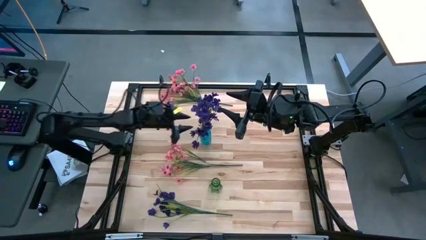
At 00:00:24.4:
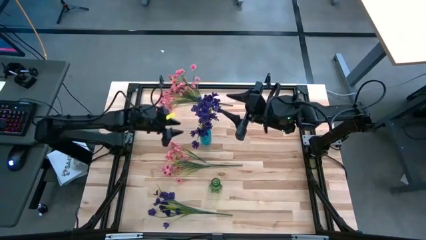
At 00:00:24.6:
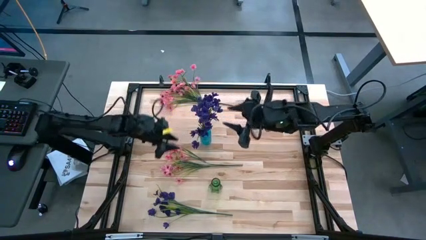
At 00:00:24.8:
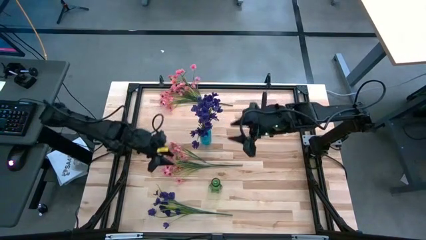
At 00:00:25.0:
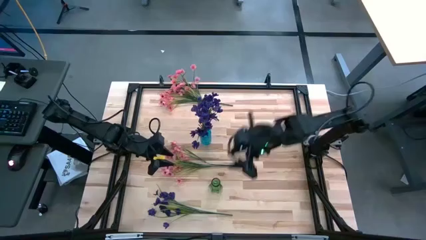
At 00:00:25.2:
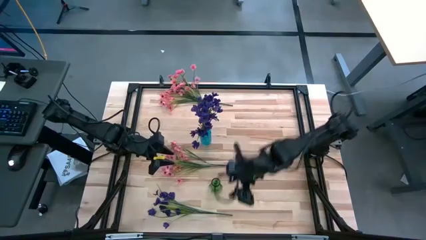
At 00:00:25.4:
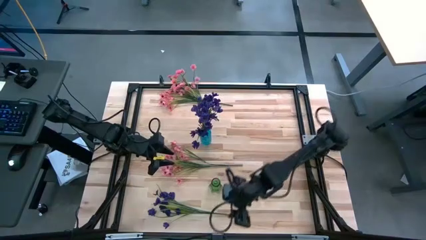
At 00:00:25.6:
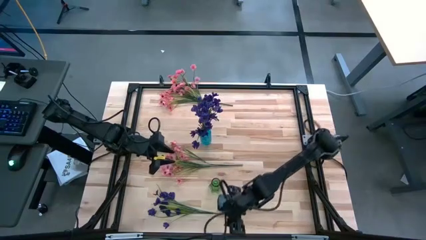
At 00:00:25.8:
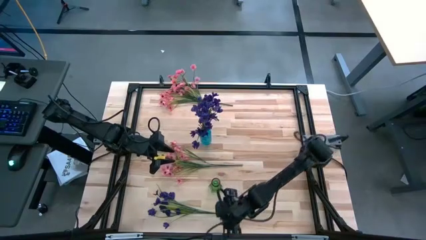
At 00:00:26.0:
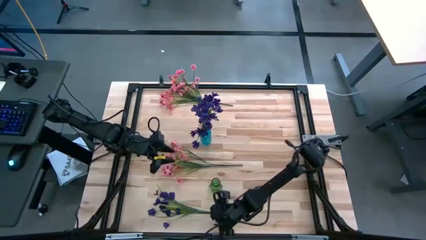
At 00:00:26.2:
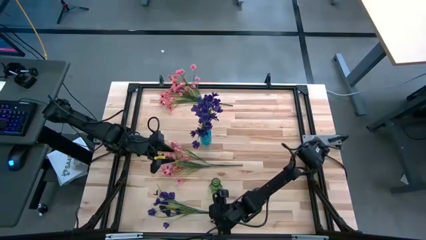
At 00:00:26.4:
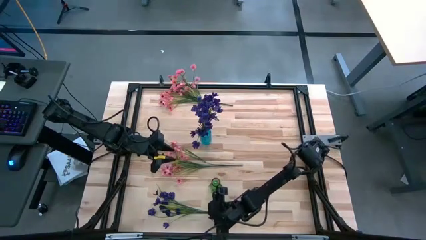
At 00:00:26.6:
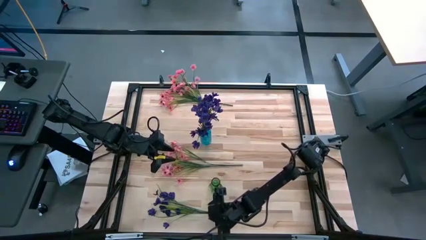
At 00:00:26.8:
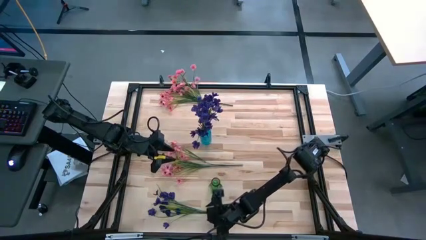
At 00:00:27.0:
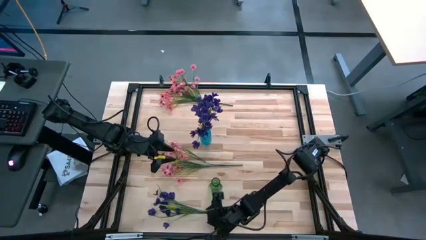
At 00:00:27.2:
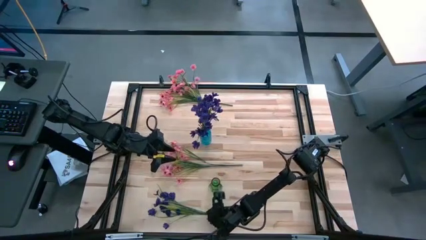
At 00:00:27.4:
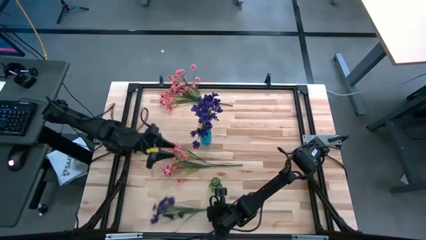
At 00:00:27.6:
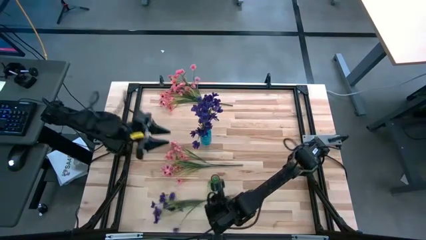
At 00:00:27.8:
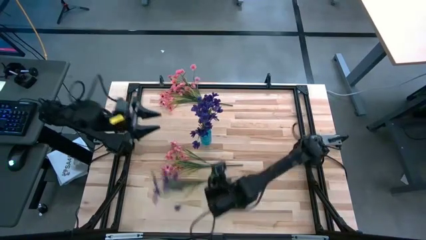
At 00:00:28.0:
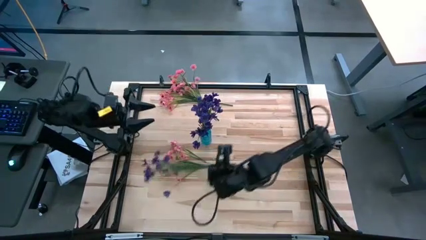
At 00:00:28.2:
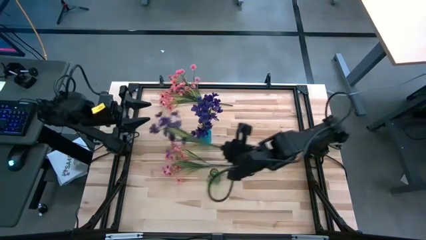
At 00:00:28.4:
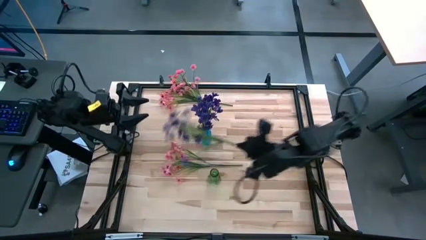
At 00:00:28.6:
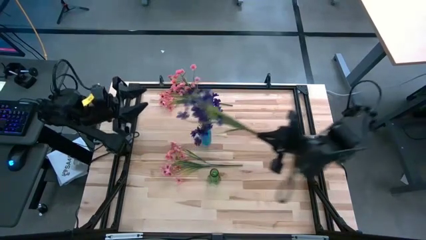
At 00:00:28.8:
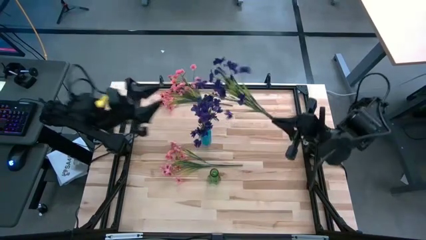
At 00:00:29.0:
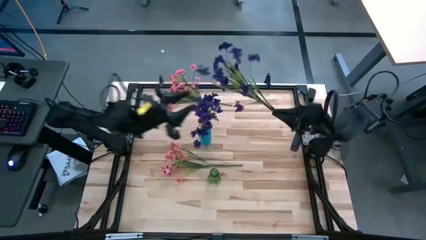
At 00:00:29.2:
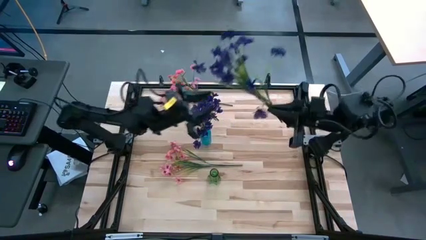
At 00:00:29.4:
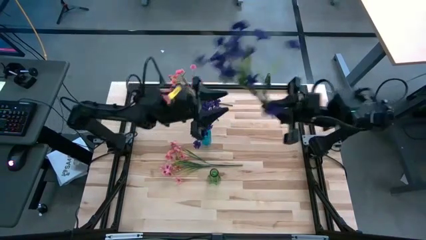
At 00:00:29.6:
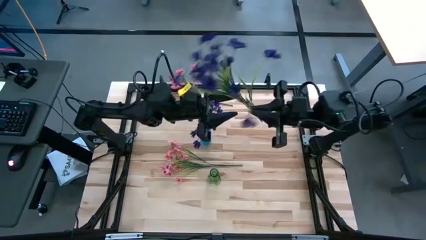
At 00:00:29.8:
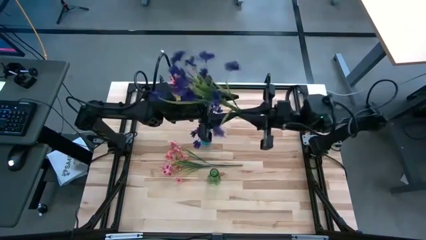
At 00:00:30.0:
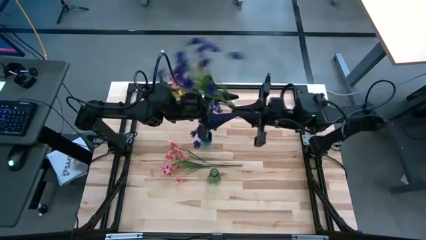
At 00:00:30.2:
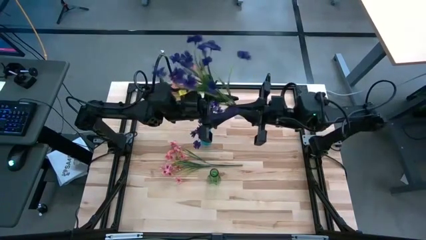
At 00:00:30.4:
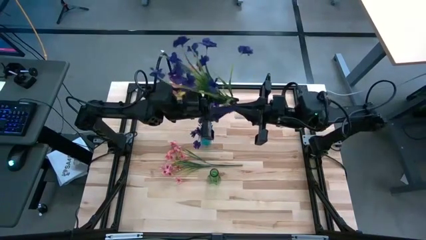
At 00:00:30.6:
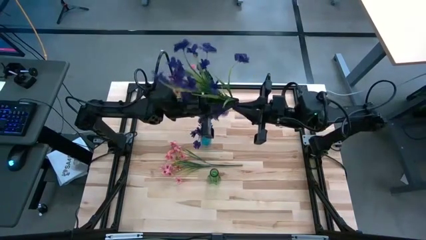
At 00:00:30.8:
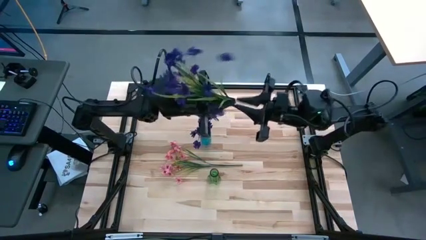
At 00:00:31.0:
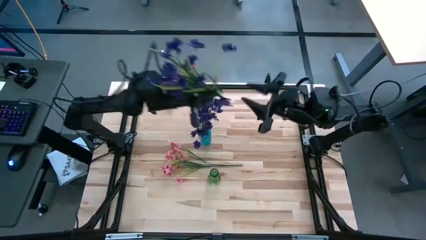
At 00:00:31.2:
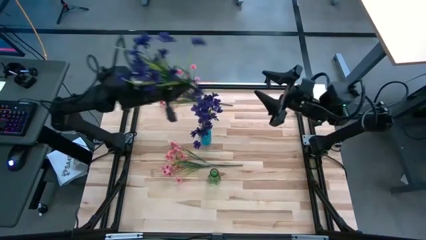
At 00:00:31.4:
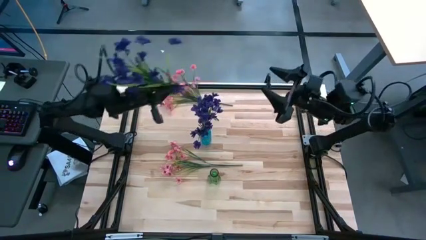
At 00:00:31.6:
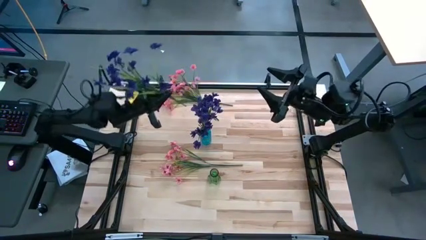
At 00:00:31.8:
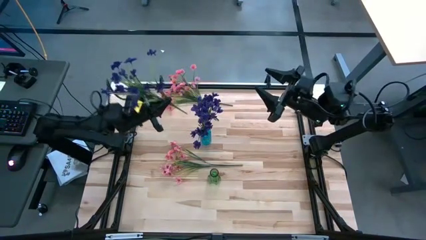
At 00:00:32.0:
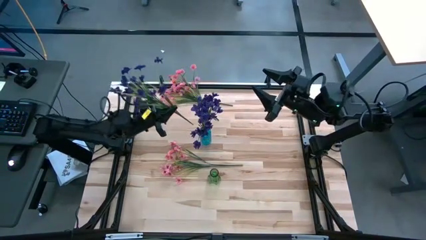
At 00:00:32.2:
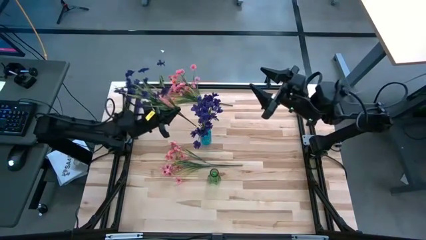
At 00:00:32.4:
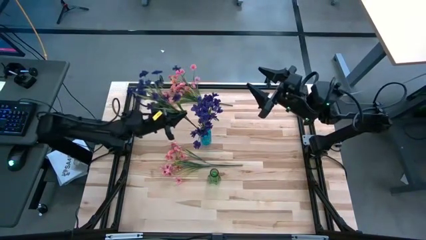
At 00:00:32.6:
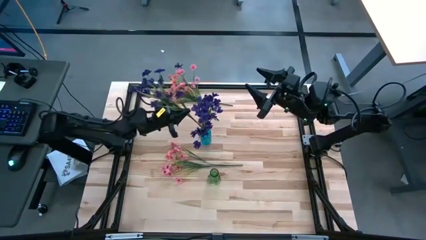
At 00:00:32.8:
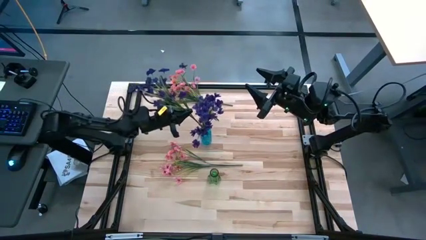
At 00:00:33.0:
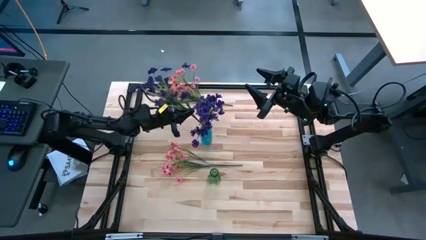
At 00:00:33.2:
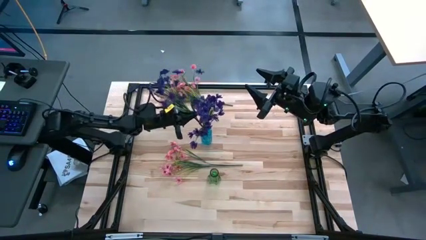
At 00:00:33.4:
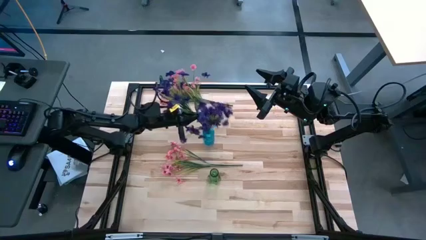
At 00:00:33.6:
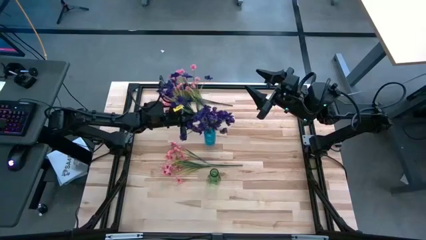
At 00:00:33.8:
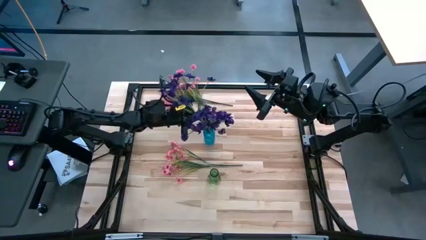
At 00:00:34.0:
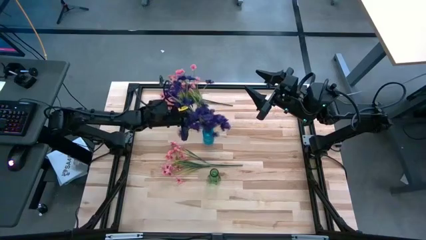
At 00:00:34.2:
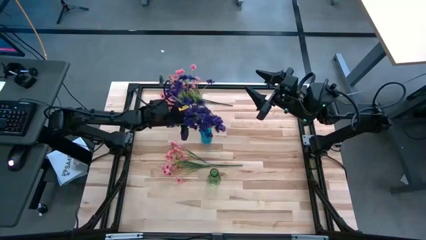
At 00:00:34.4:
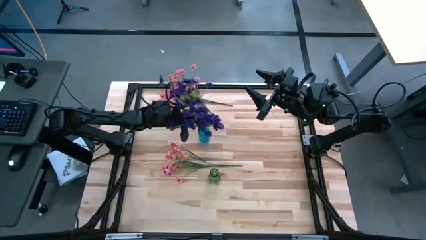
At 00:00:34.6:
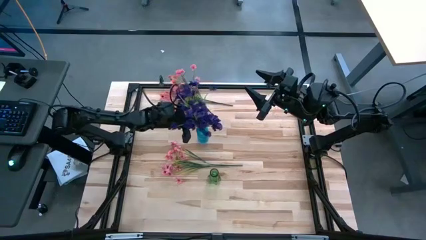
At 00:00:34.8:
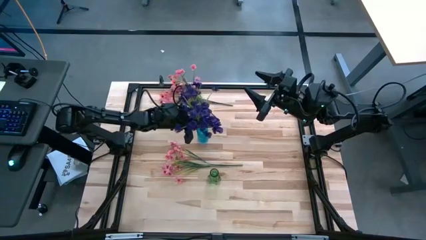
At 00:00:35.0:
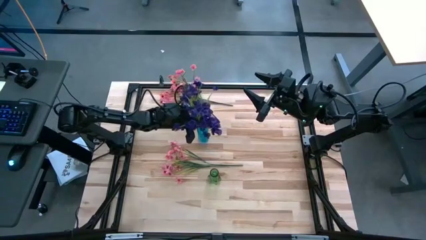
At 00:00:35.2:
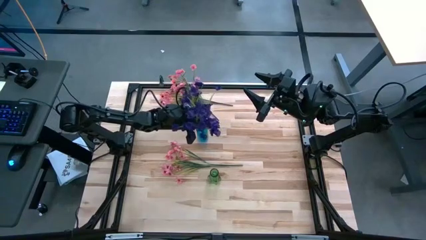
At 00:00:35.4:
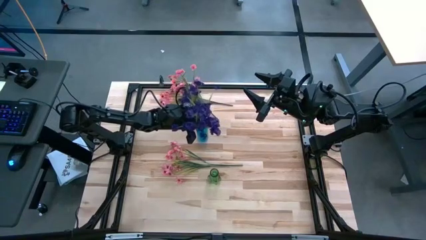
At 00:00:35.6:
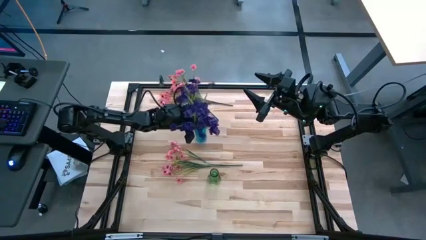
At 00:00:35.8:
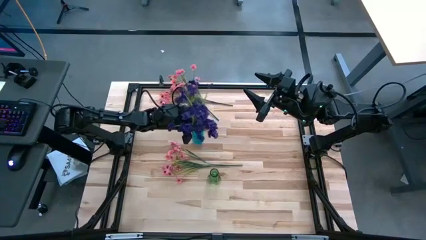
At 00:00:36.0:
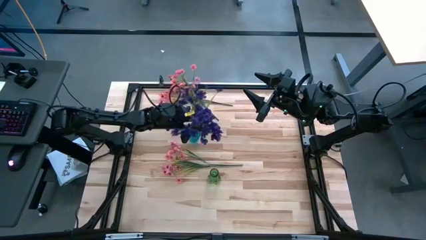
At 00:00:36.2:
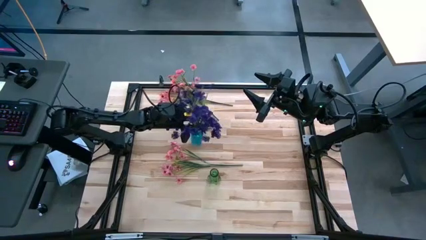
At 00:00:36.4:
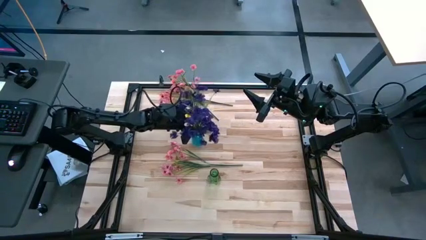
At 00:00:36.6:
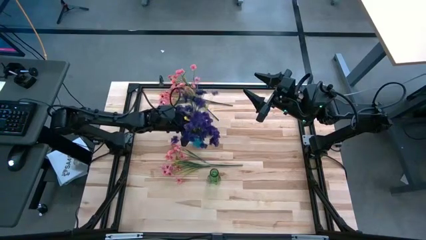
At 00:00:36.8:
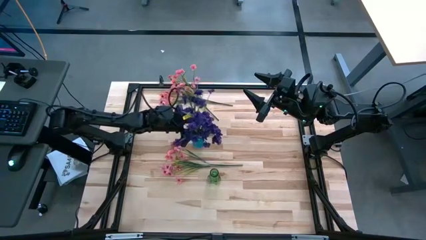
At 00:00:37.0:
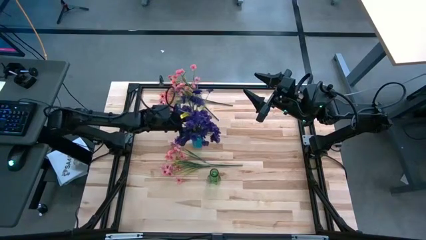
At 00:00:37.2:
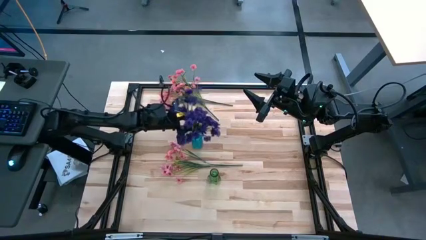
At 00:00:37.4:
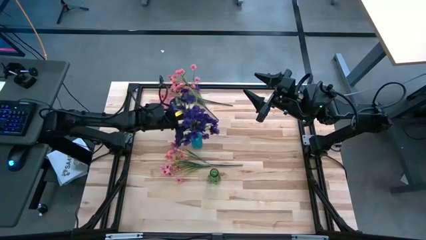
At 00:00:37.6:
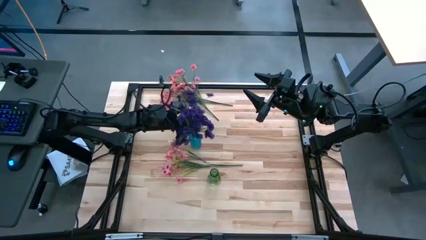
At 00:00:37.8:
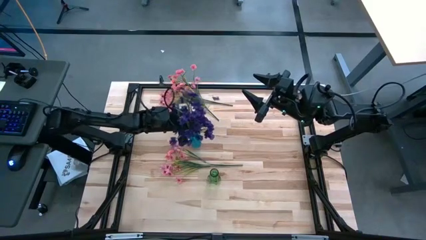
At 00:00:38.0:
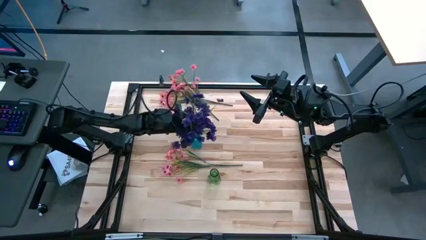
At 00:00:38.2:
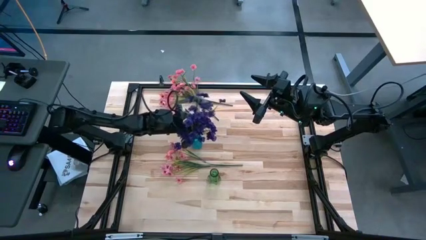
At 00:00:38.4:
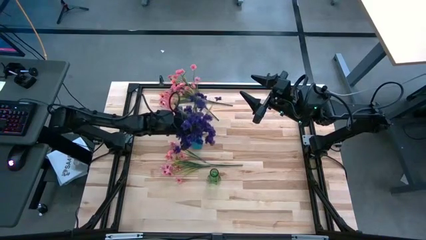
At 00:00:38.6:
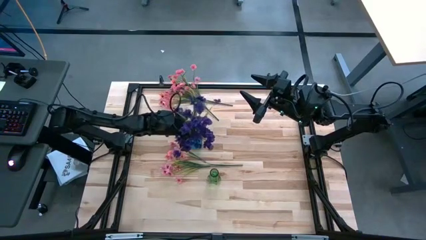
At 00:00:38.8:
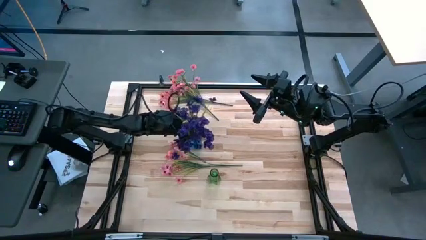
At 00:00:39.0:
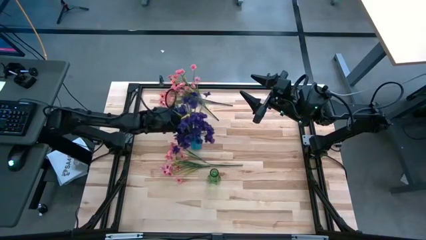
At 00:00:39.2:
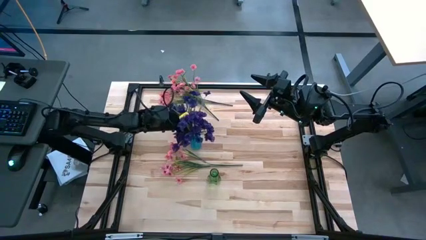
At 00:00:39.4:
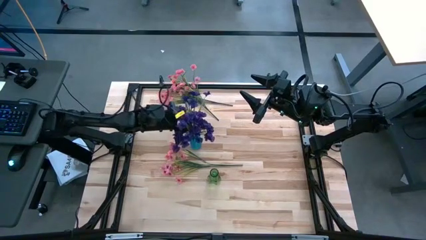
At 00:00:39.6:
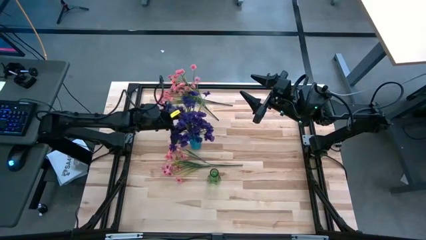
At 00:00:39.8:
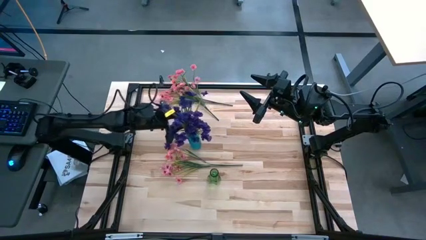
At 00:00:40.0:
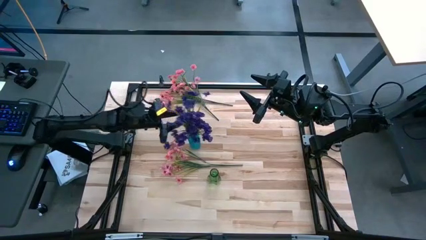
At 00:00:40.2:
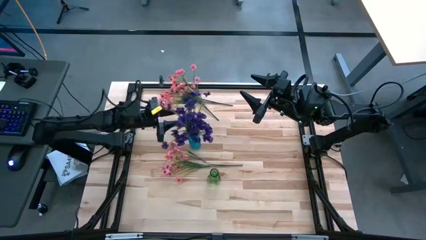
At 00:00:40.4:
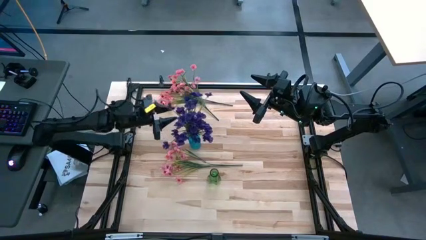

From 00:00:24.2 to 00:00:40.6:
Task: Sort flowers into vase by color
Put the violet flowers into the blue crystal vase

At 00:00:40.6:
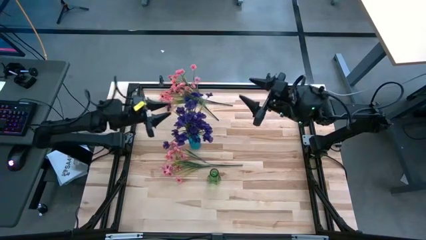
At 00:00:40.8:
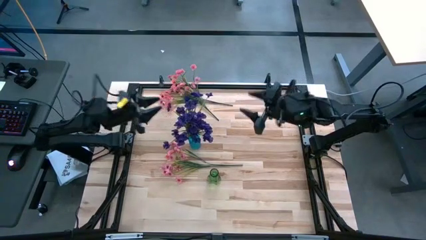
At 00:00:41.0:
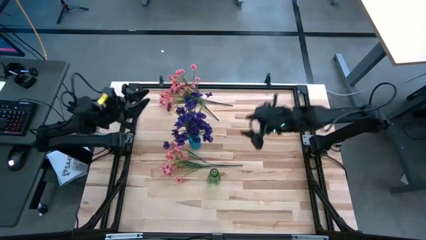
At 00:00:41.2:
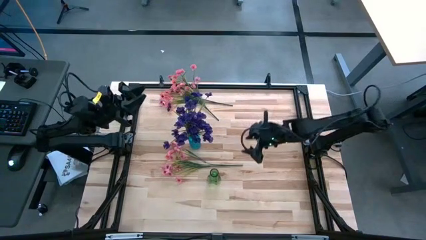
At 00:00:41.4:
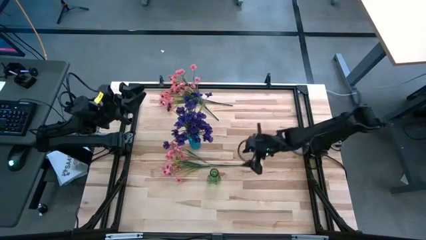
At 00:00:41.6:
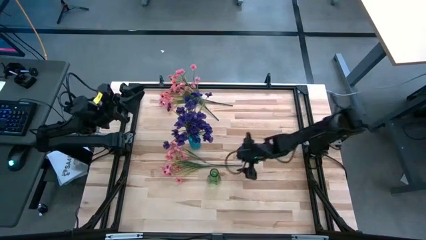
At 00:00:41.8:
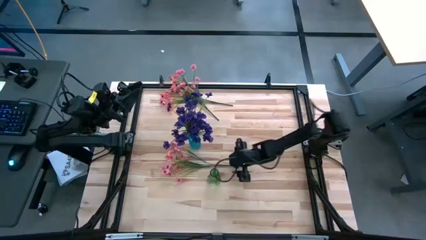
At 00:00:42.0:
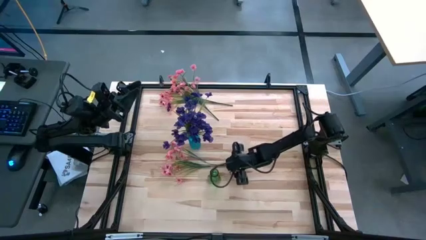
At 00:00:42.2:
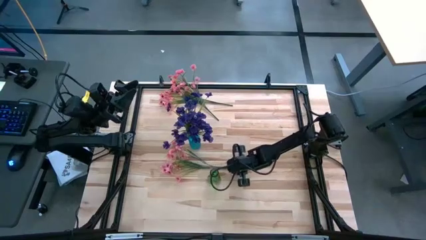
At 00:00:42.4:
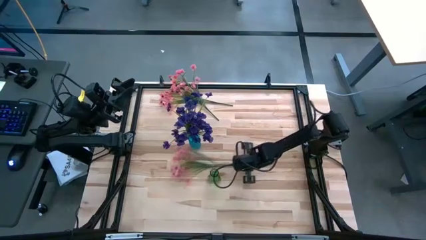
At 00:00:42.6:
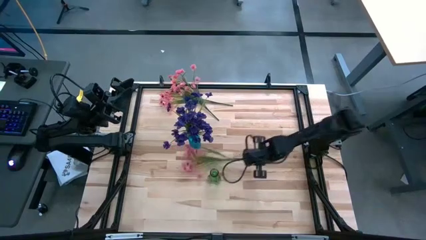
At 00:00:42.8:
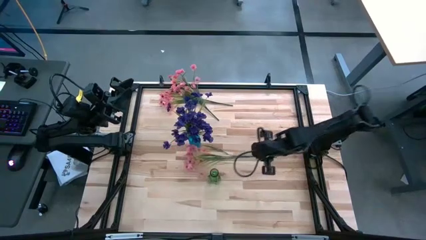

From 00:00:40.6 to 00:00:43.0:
Put the bottom center pink flowers into the green crystal vase
